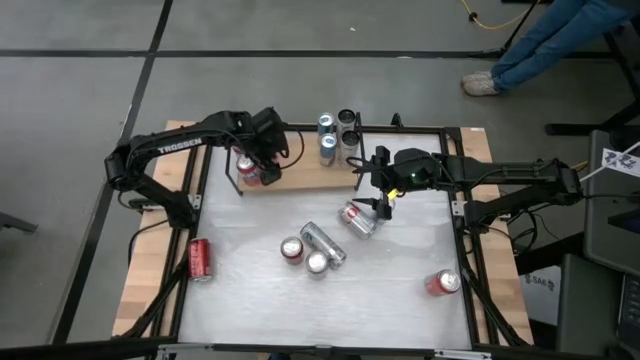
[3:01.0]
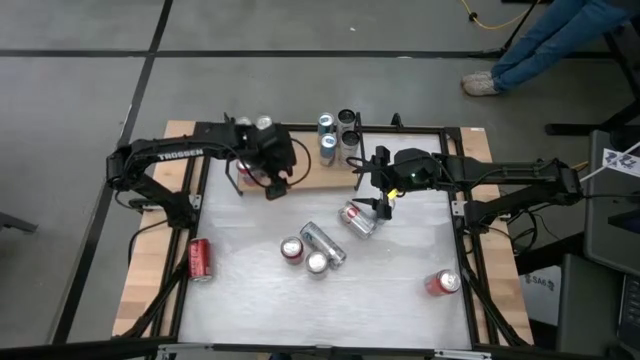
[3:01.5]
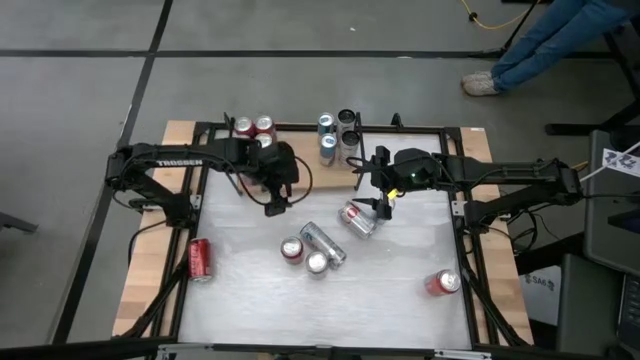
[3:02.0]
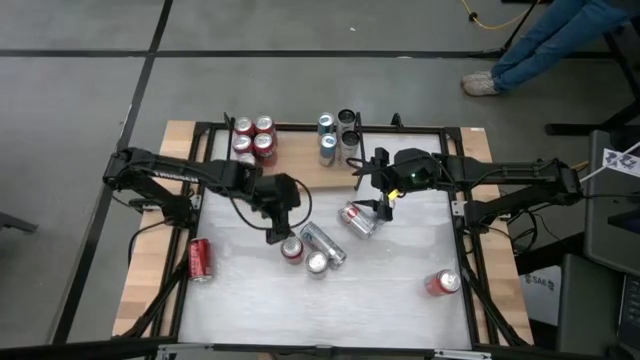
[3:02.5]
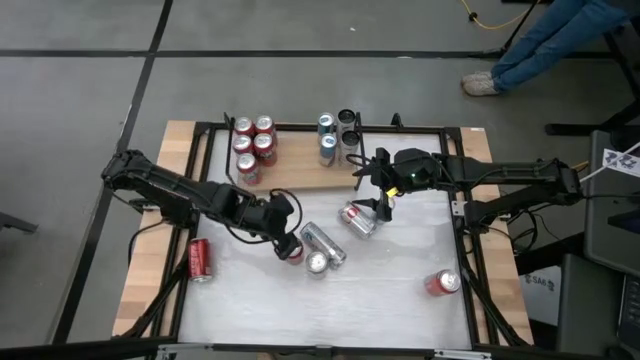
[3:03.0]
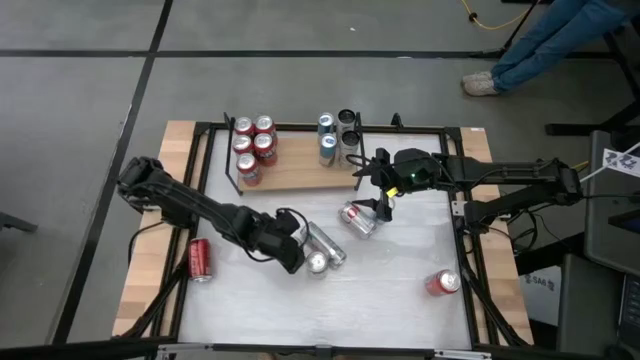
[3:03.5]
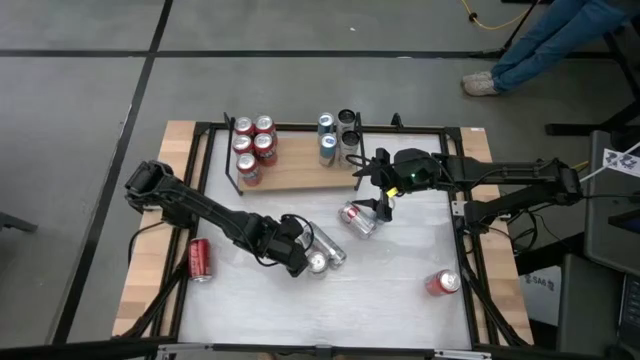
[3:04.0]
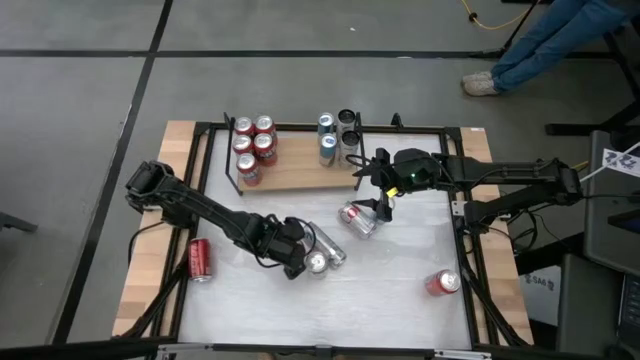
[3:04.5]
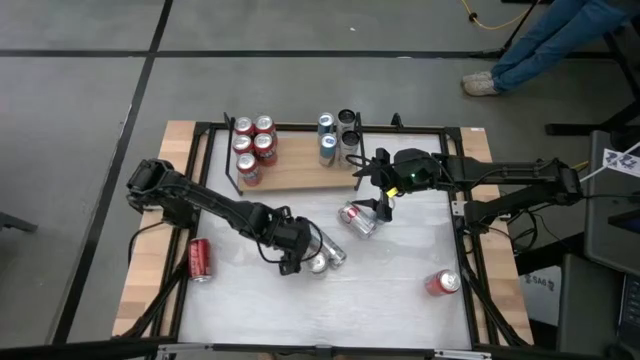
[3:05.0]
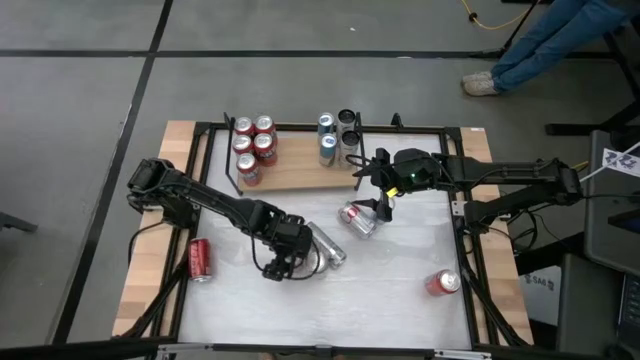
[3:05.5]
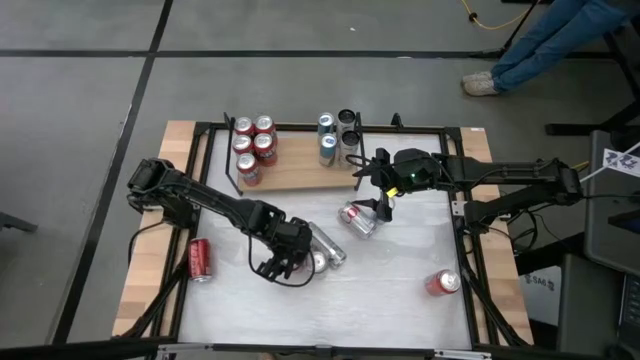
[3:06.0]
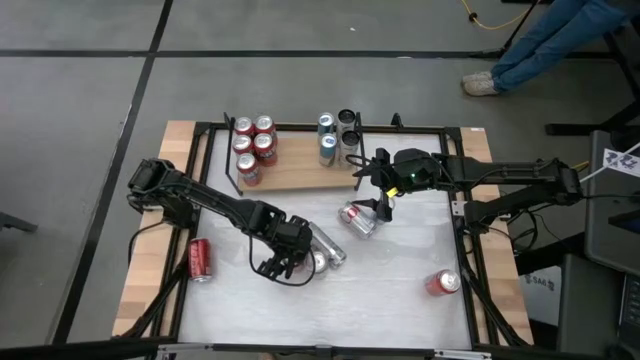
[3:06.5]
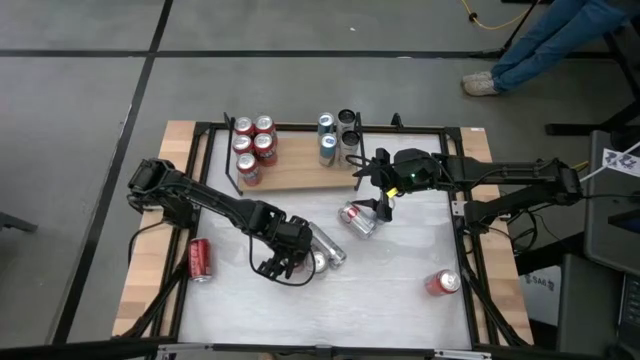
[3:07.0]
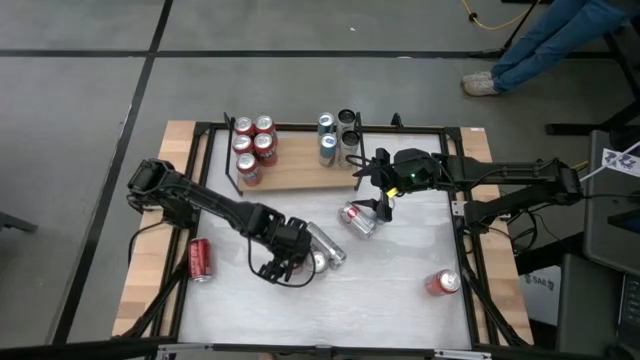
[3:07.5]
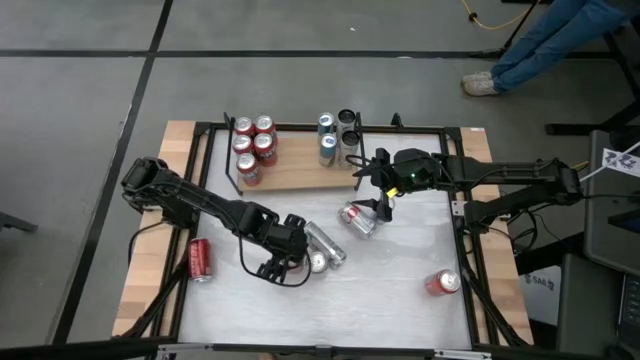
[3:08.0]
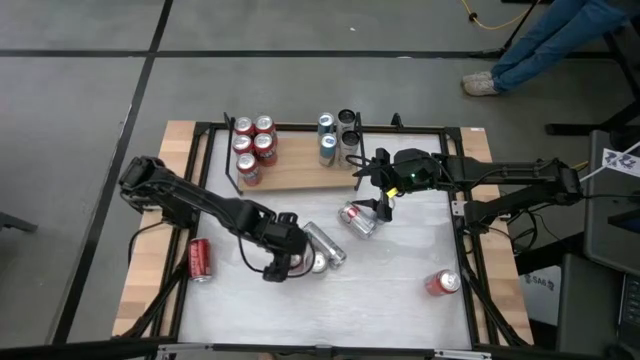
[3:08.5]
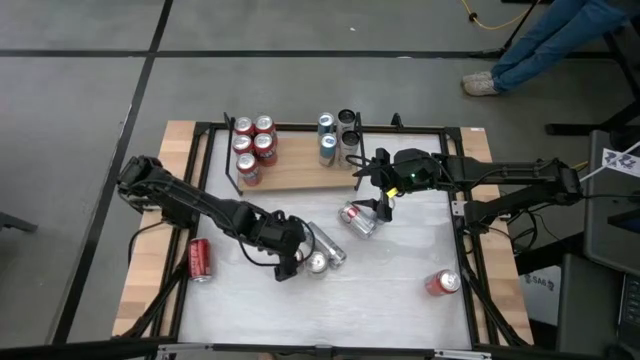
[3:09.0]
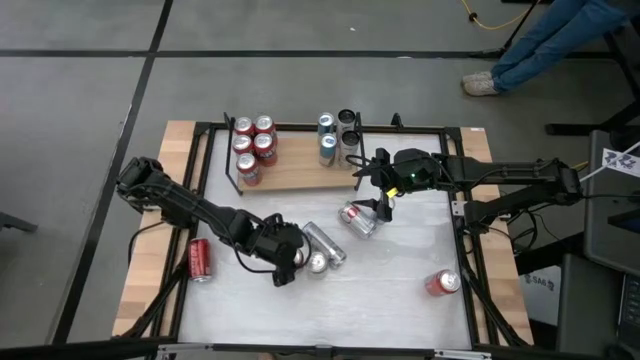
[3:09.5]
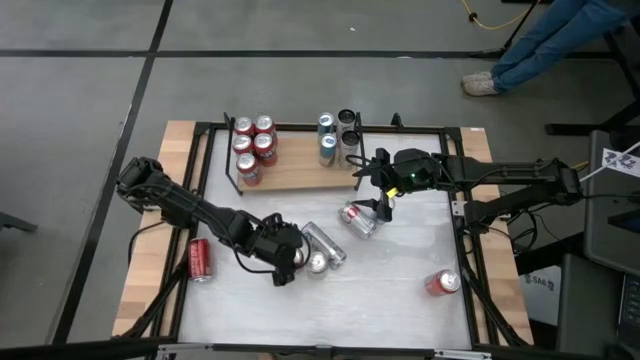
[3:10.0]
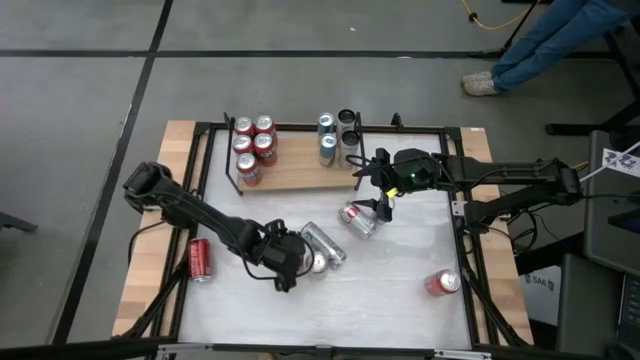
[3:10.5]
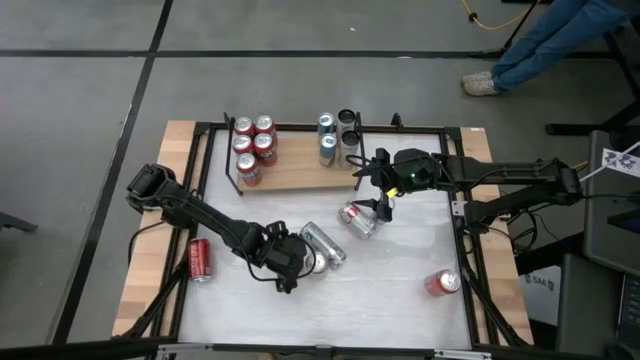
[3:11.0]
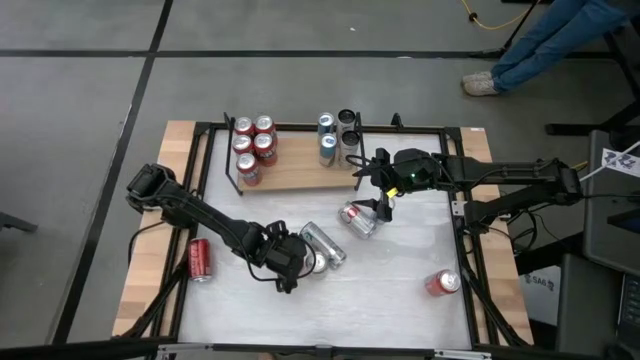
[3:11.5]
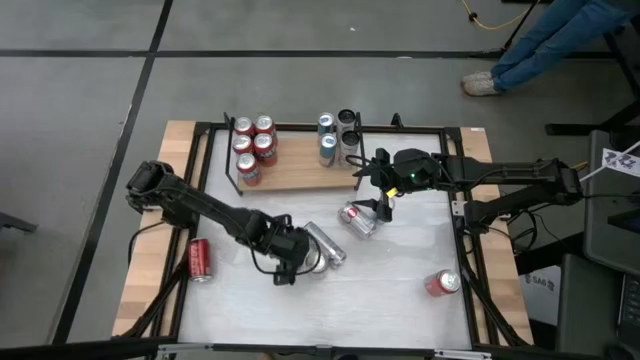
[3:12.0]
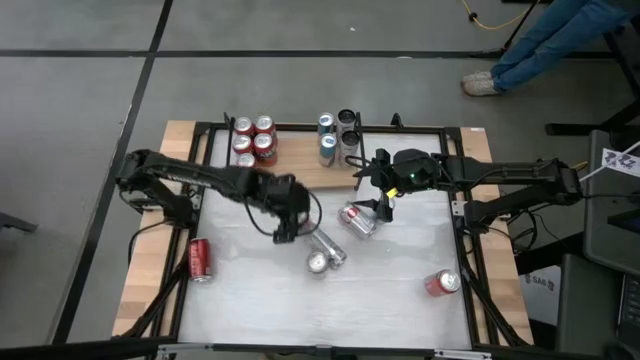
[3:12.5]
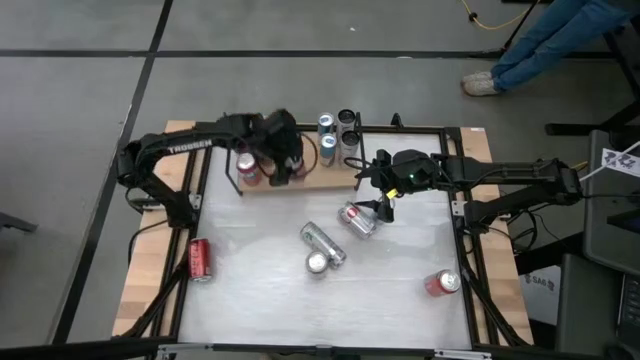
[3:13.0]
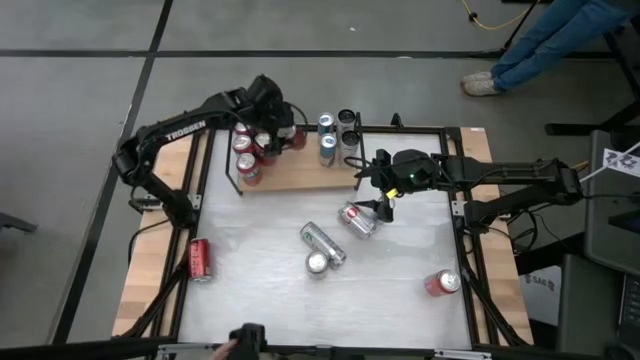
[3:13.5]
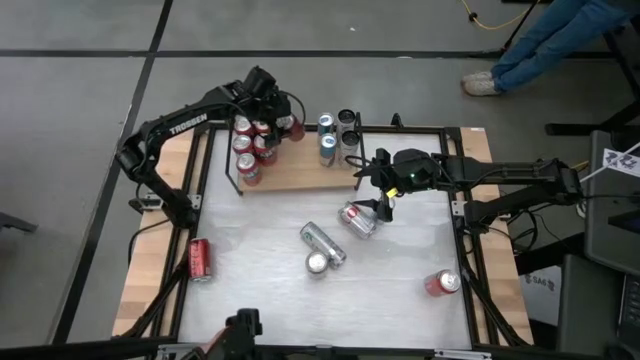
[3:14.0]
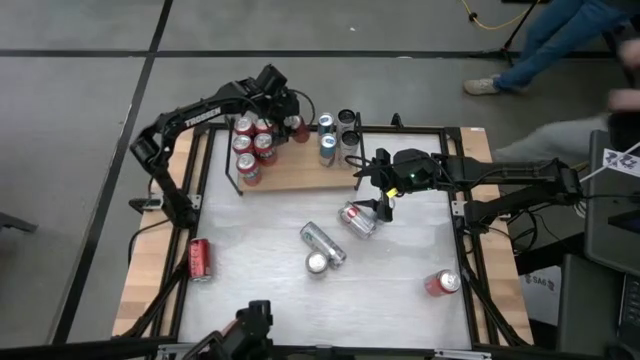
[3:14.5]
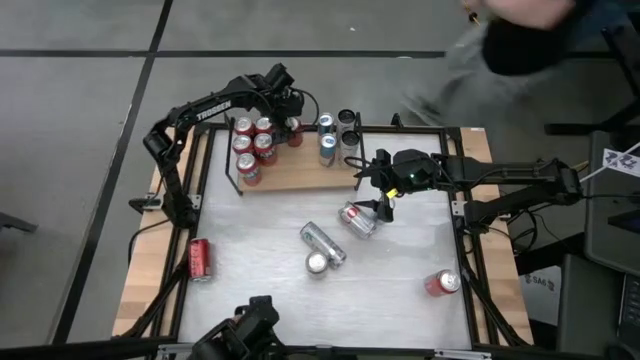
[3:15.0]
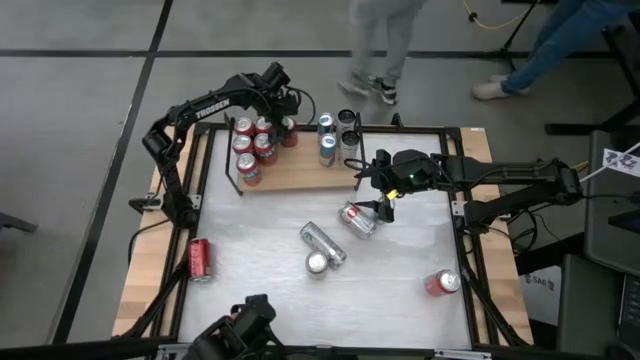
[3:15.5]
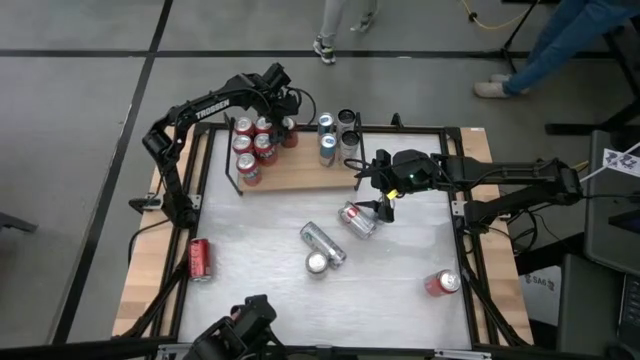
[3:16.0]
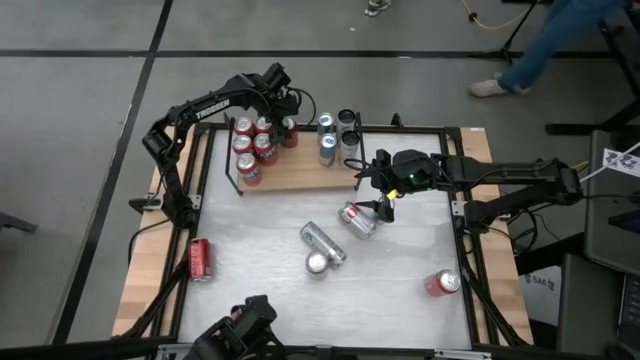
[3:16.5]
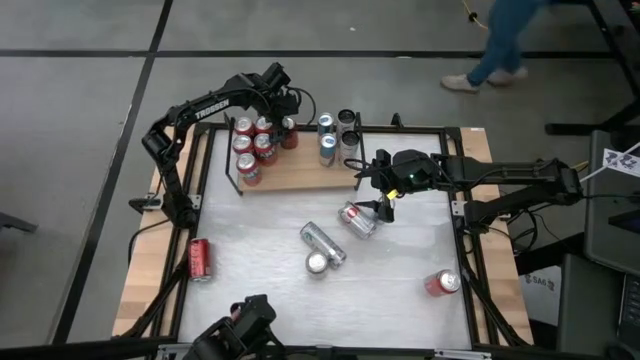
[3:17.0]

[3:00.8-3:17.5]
Task: Place canned beverage on shelf
Put the red black soda can on the shelf

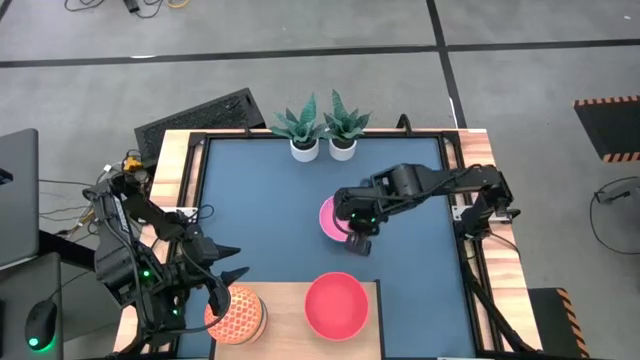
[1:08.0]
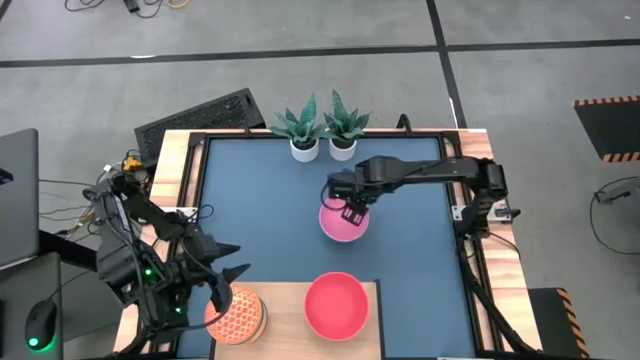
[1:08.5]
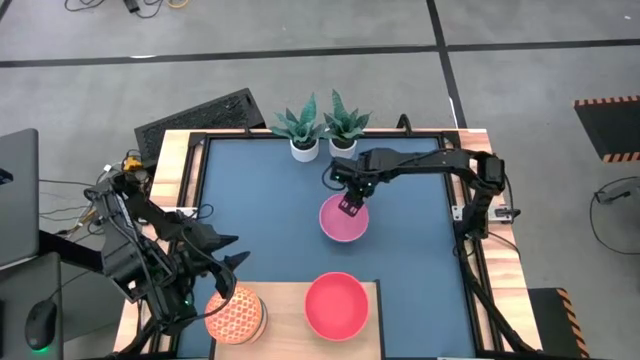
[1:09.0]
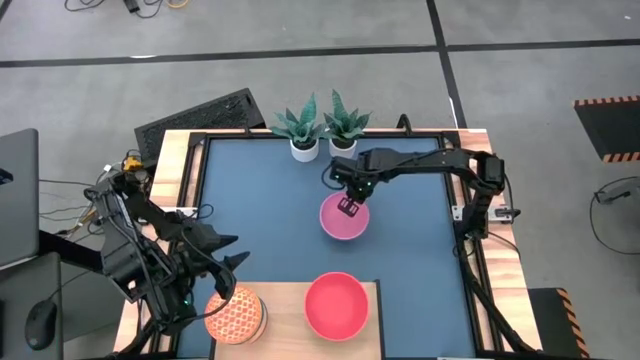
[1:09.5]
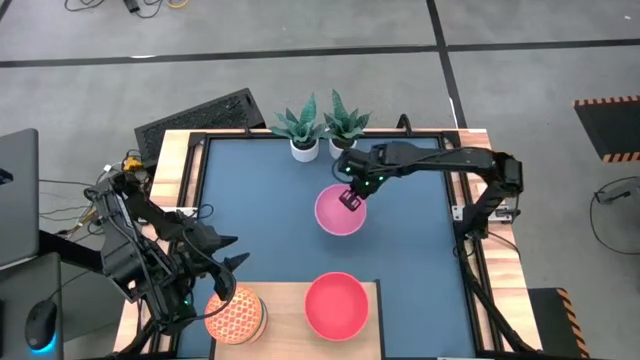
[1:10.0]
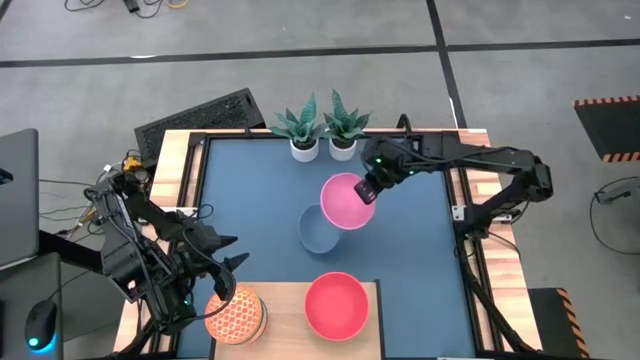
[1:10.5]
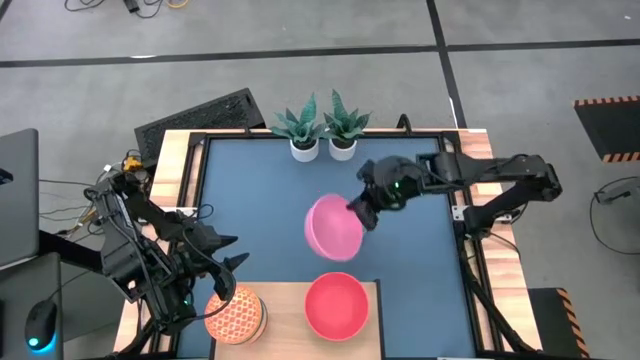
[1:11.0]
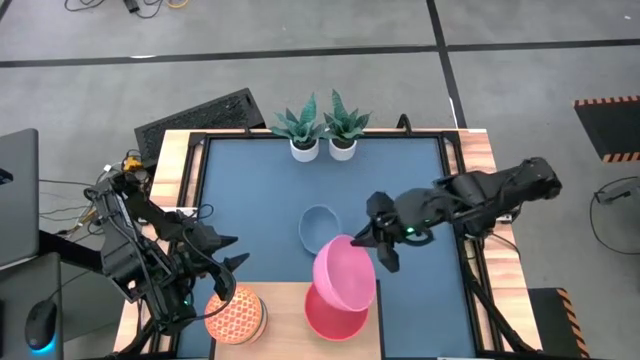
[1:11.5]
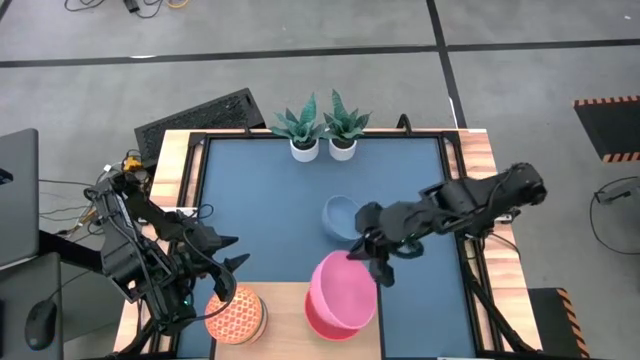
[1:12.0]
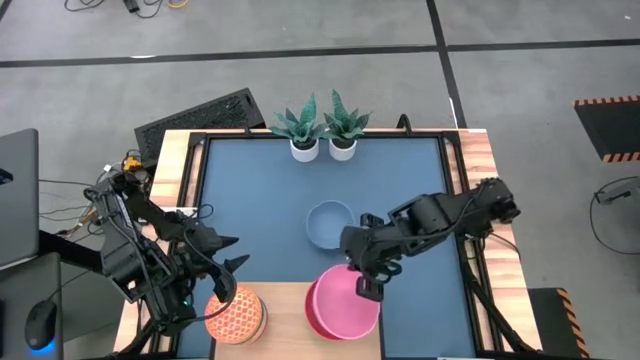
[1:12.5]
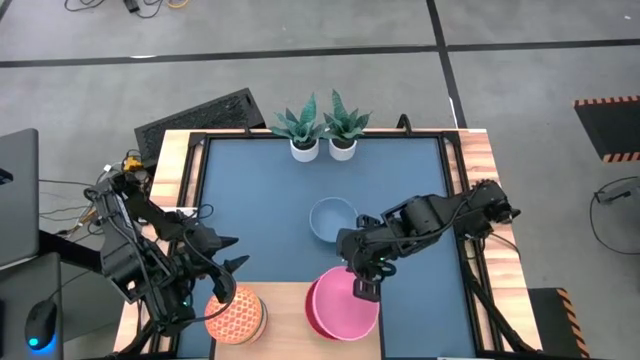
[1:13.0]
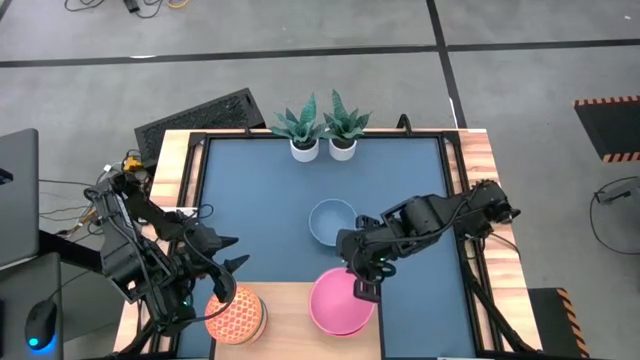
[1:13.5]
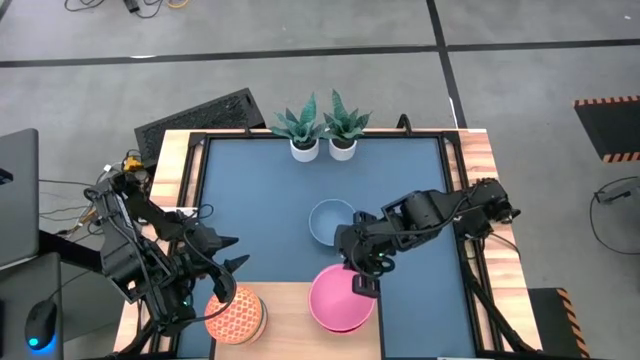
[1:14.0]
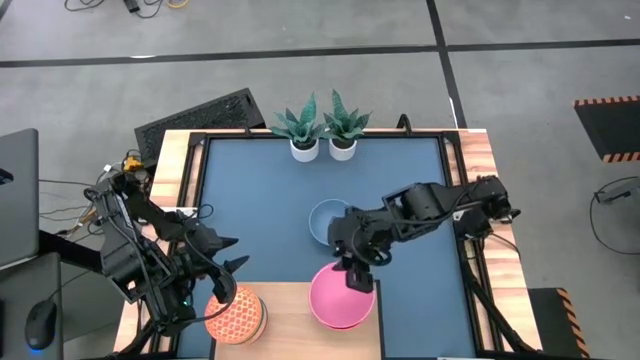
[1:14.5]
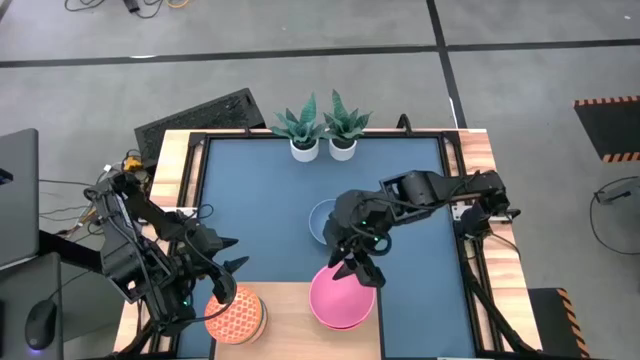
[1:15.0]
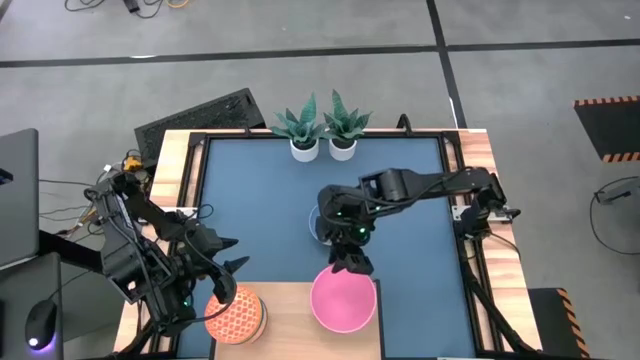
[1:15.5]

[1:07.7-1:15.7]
Task: Place and stack bowls onto a shelf
Stack the pink bowl on top of the orange bowl on the shelf
